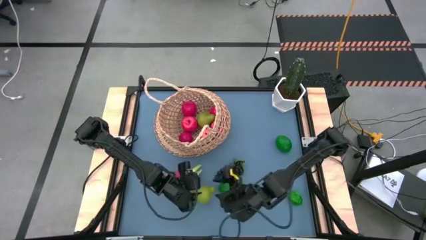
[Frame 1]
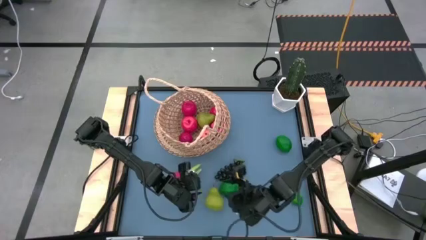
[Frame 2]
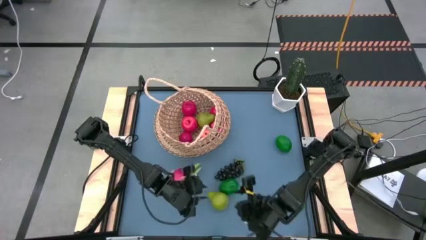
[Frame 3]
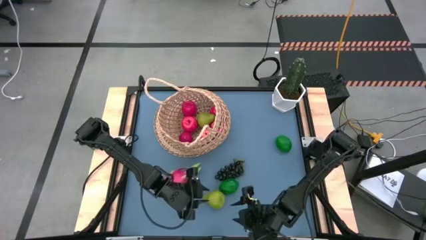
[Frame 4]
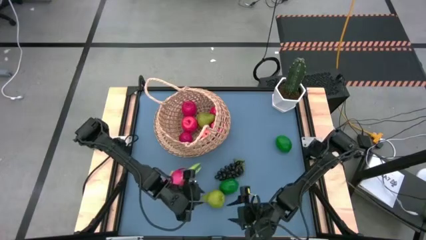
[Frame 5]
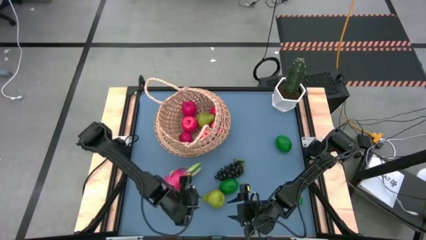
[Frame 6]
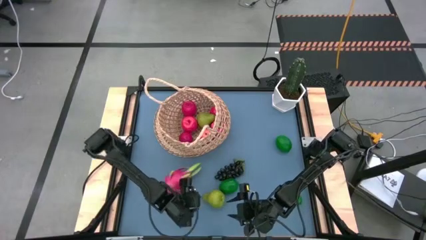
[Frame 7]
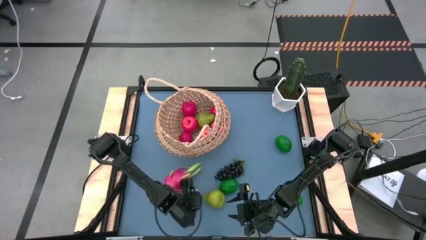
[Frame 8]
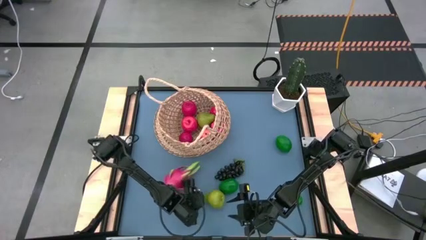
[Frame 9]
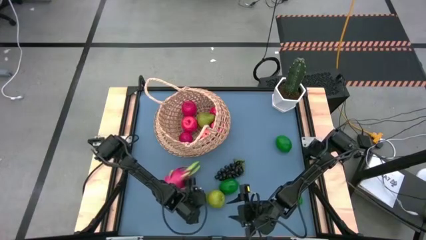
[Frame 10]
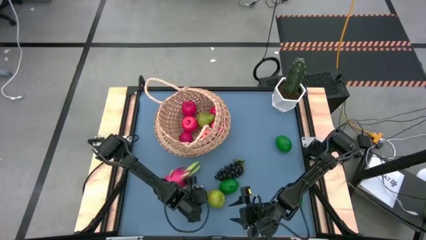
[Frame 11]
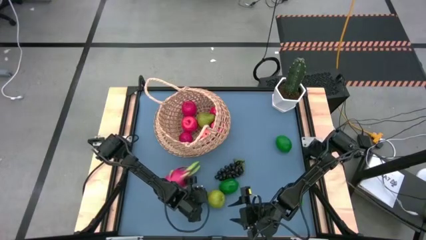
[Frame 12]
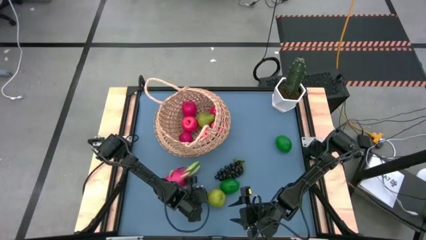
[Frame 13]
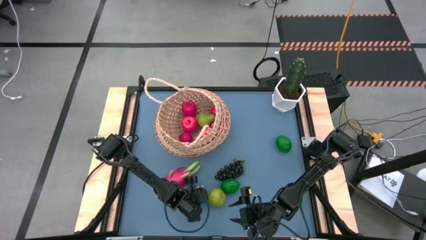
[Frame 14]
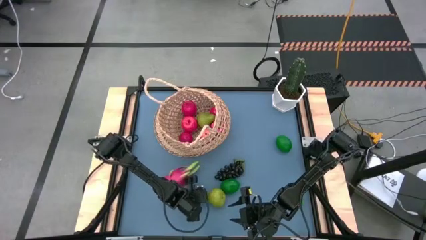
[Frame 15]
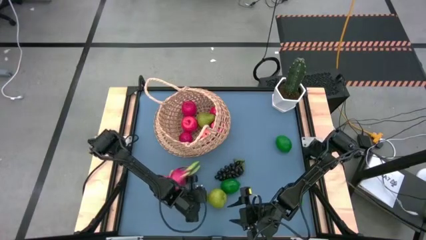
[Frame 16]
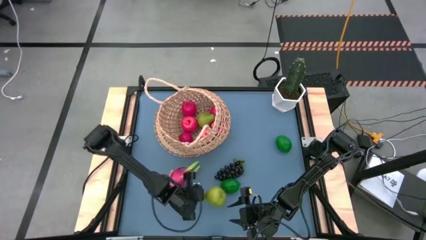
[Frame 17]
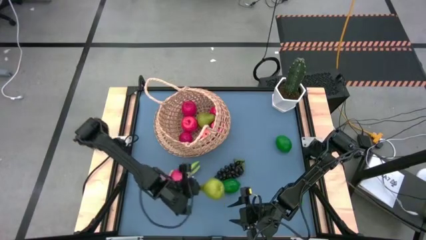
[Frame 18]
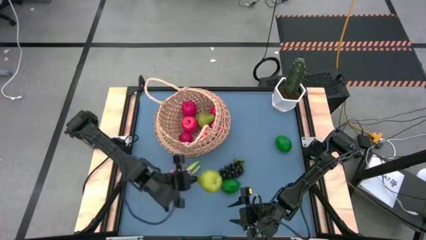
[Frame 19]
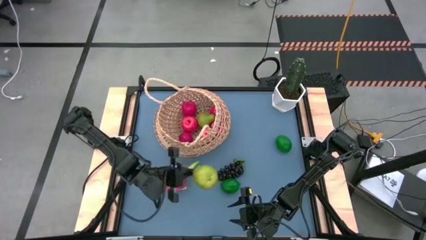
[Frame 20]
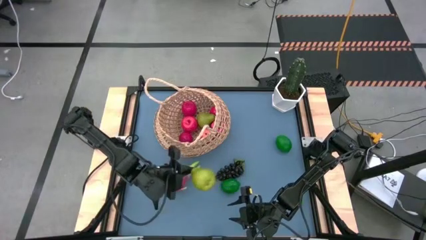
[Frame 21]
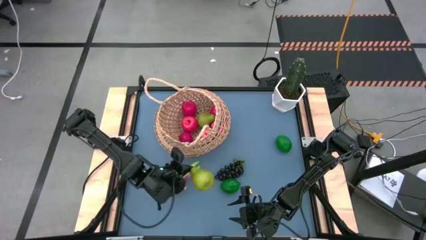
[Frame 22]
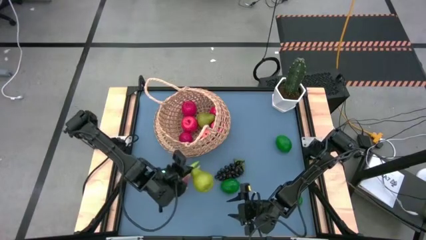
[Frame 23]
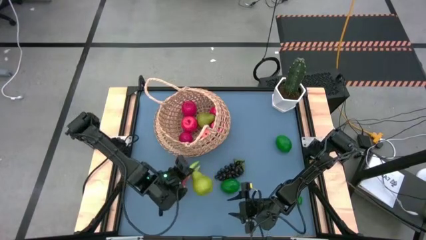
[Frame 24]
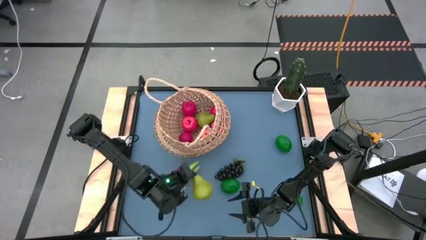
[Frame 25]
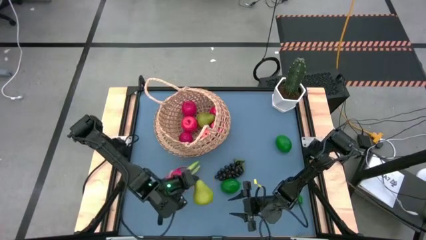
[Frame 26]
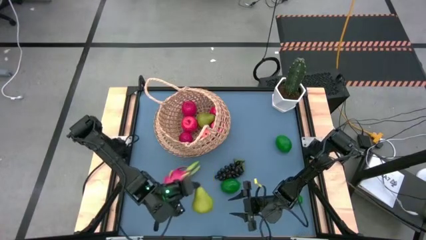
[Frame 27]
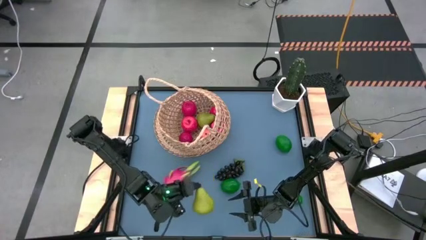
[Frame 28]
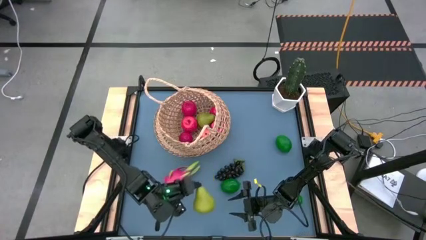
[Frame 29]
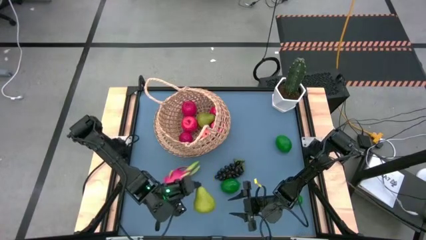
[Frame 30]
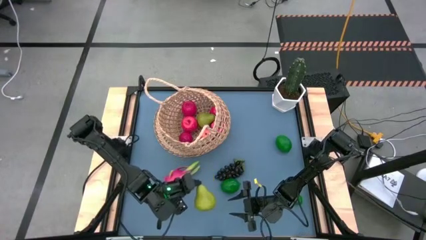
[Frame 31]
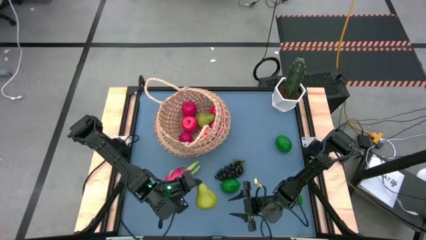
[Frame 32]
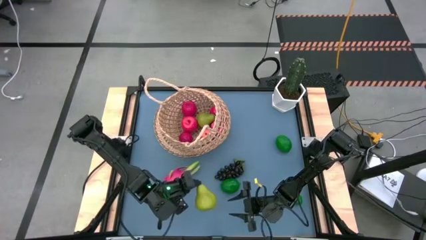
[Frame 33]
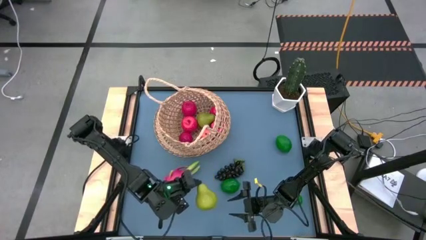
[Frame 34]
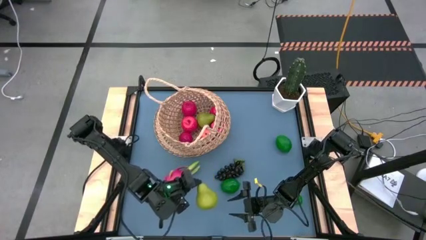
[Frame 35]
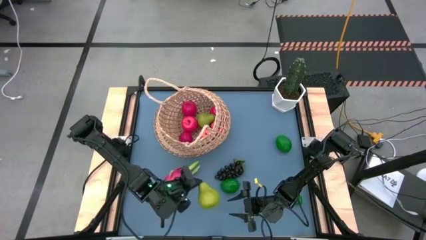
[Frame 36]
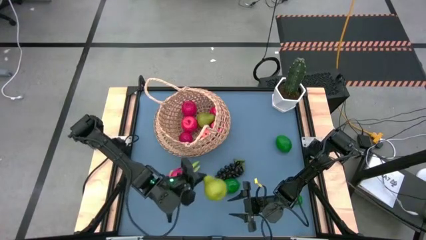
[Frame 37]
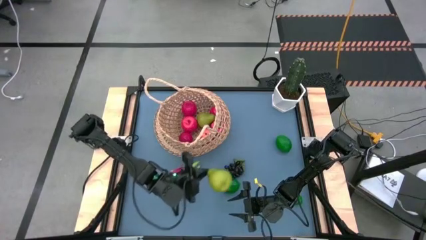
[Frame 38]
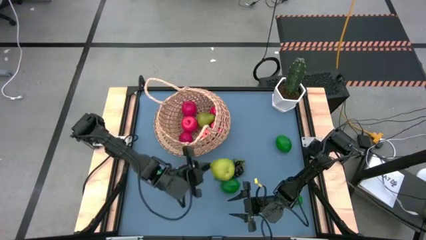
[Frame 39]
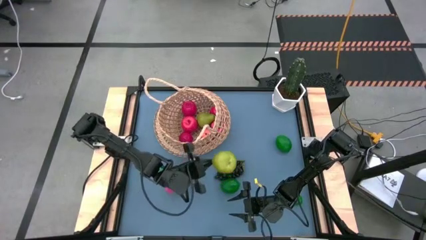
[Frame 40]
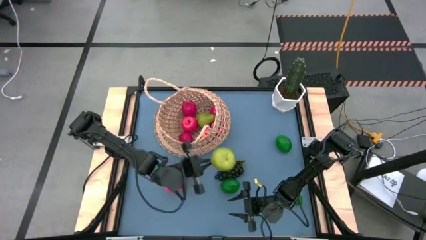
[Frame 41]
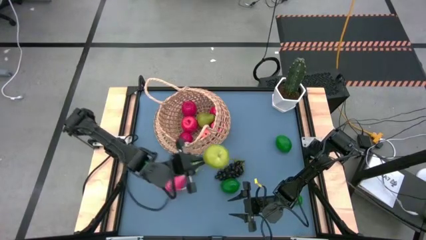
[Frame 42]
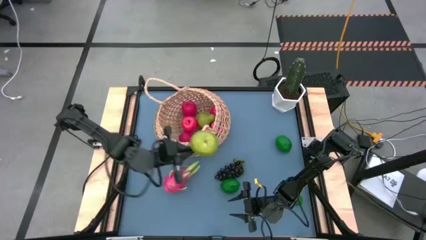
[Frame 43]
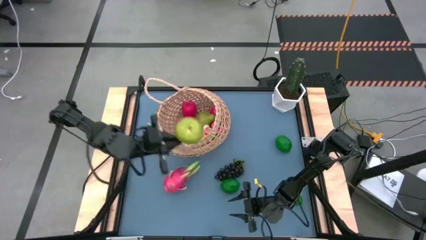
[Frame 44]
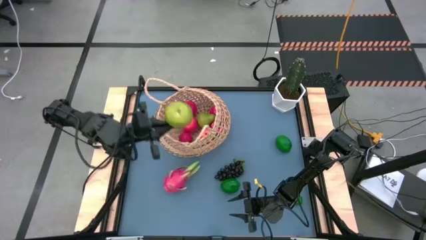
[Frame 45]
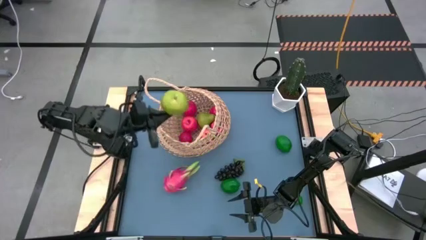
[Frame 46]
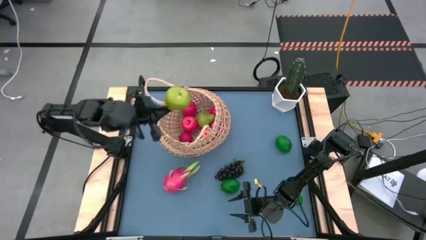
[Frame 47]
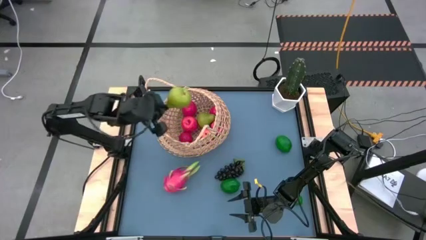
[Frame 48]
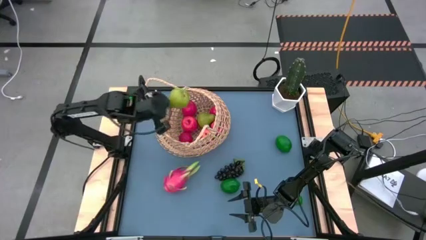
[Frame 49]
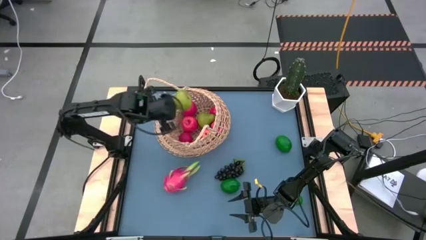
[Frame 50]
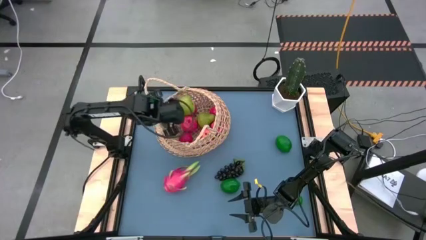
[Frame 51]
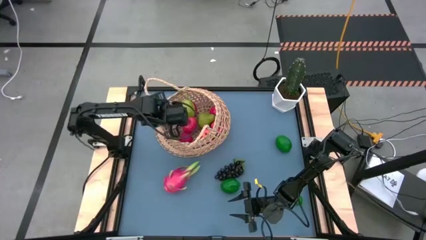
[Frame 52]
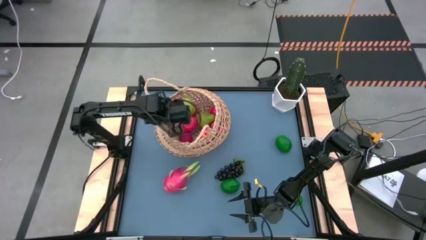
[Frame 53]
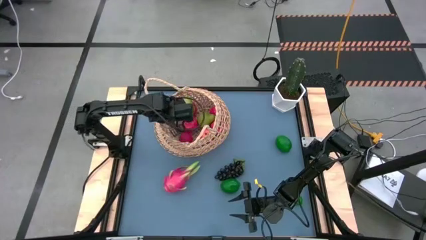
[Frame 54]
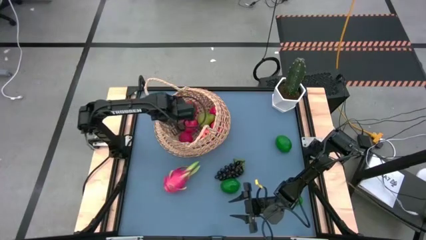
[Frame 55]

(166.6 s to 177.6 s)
Task: Build produce basket
Put the green pear into the basket
